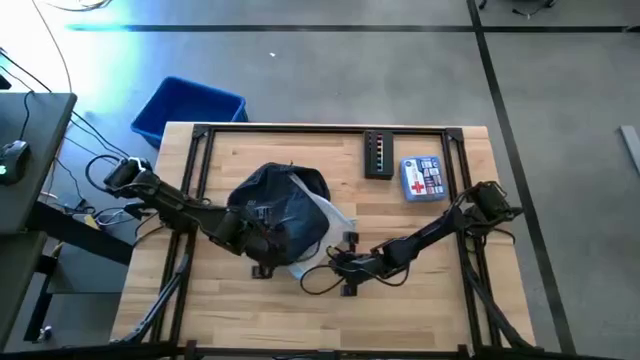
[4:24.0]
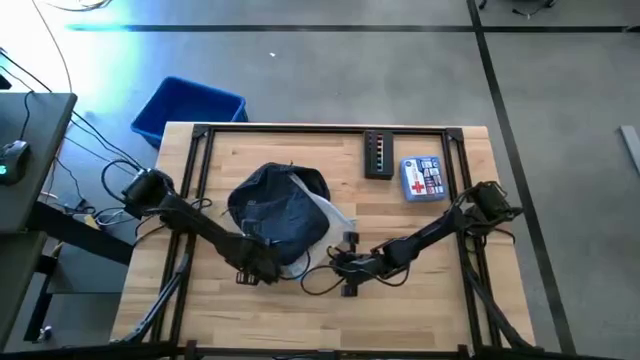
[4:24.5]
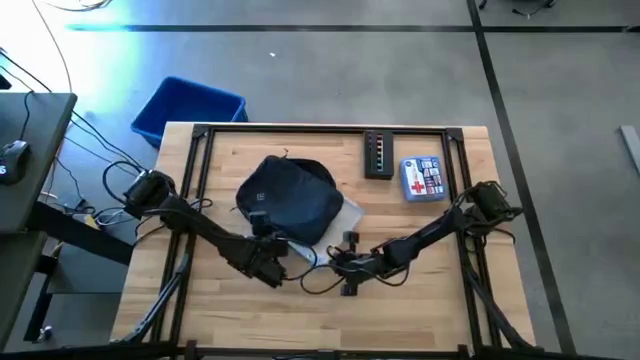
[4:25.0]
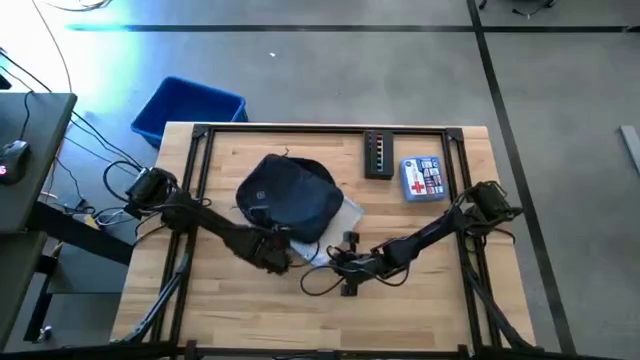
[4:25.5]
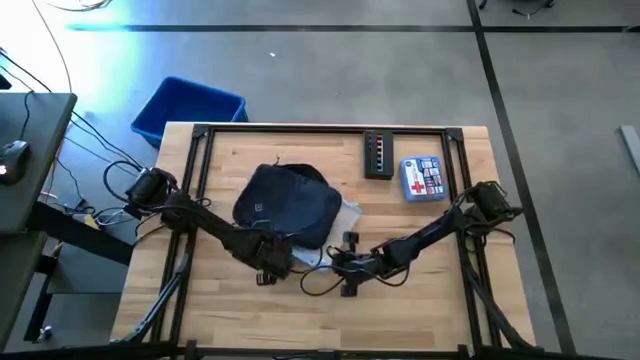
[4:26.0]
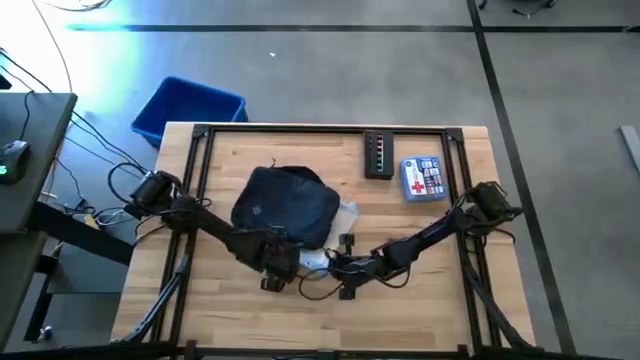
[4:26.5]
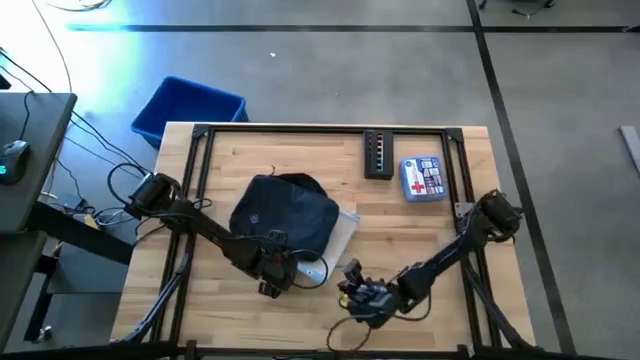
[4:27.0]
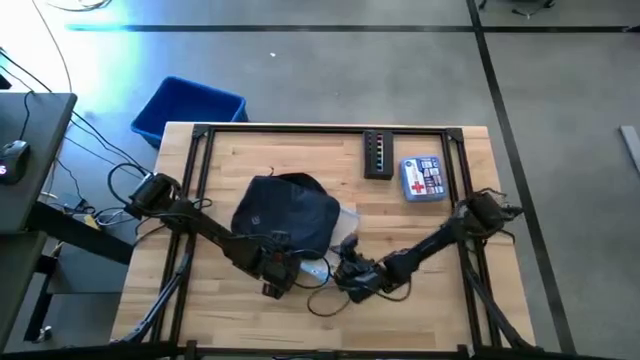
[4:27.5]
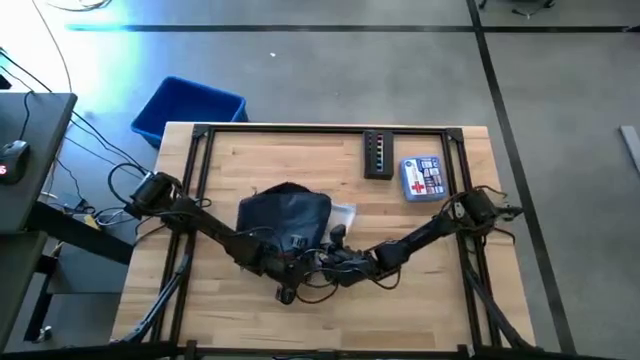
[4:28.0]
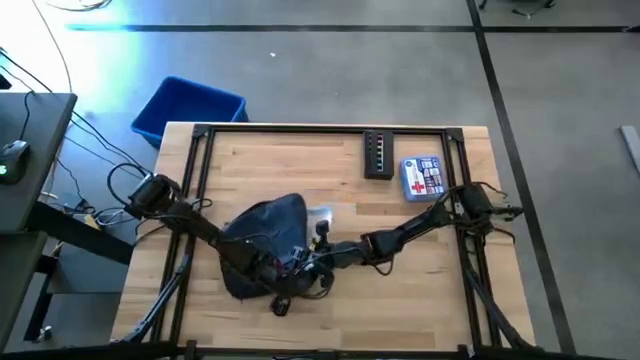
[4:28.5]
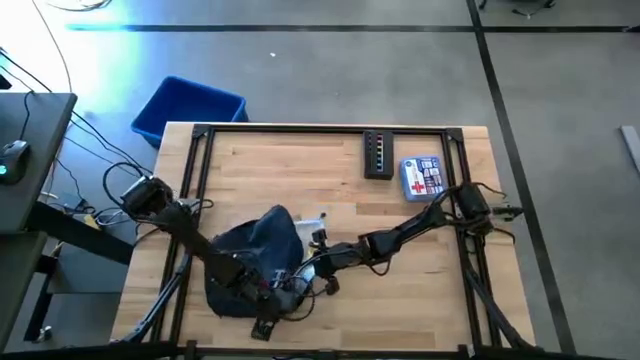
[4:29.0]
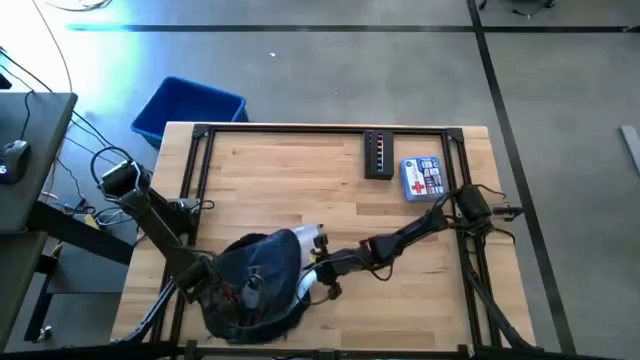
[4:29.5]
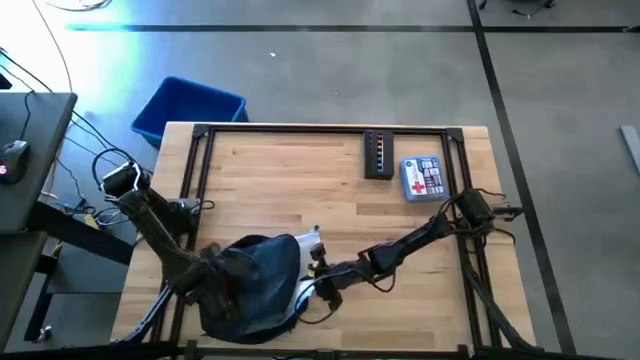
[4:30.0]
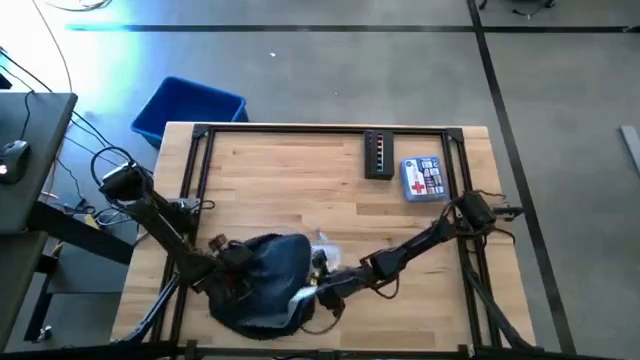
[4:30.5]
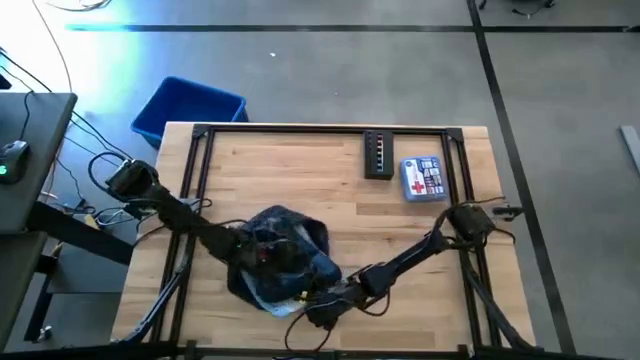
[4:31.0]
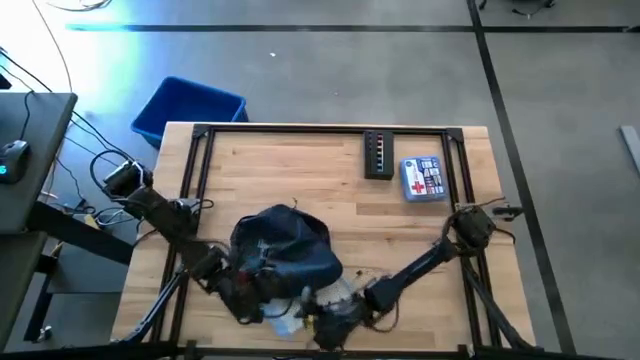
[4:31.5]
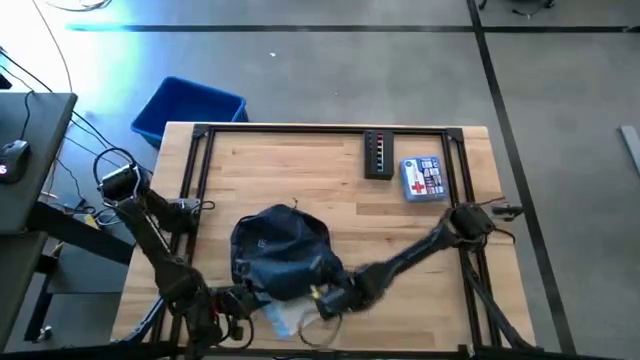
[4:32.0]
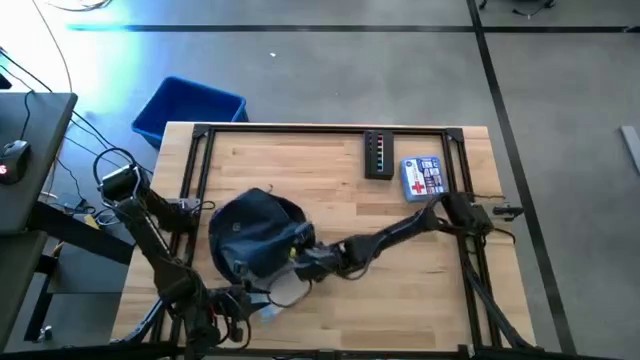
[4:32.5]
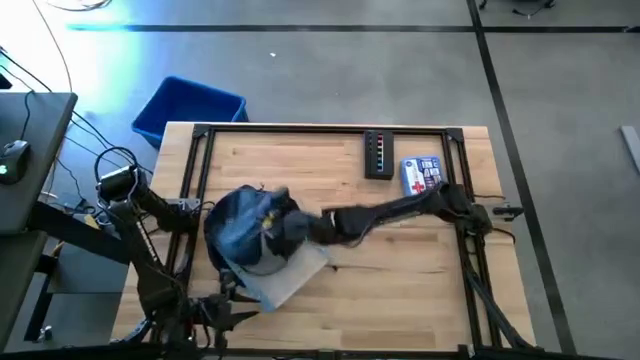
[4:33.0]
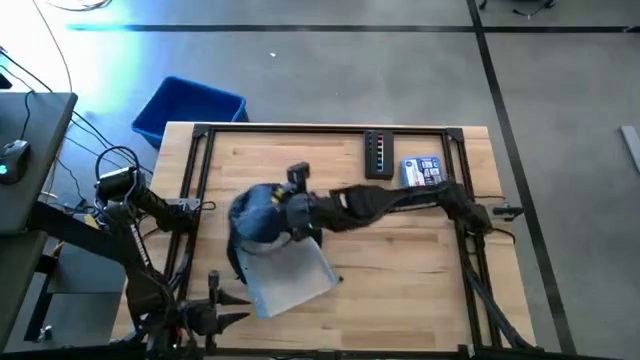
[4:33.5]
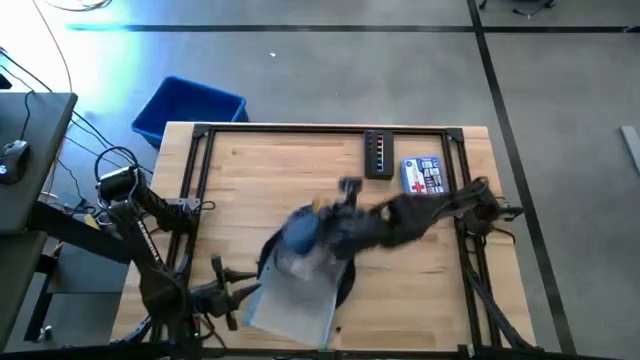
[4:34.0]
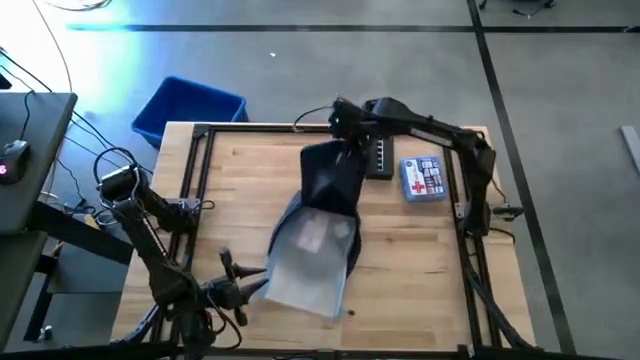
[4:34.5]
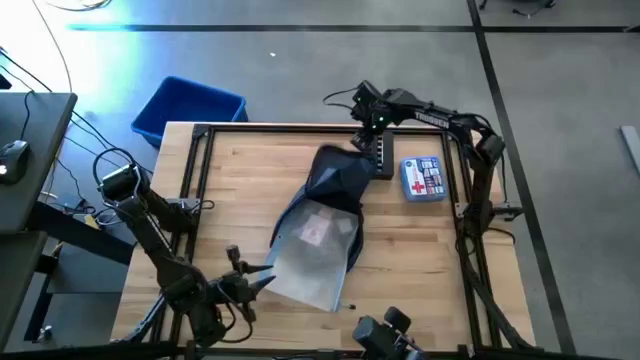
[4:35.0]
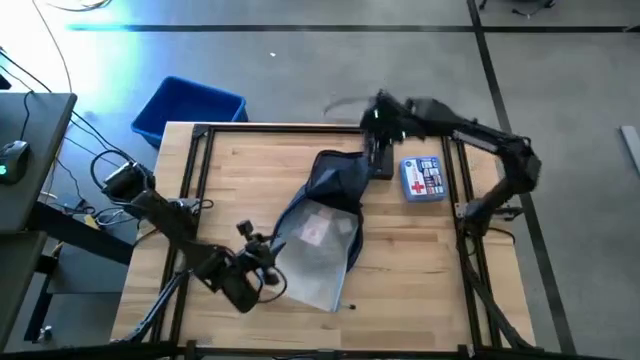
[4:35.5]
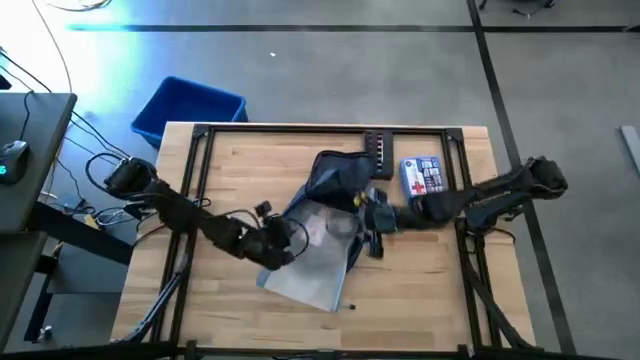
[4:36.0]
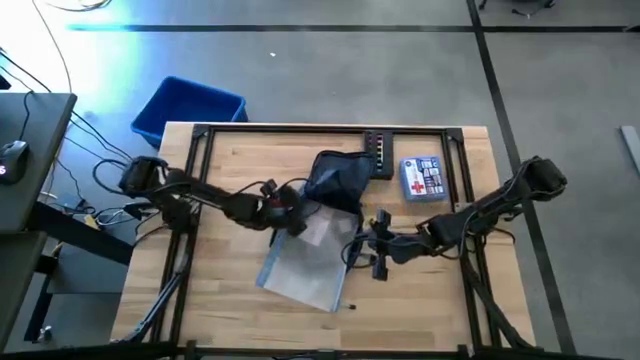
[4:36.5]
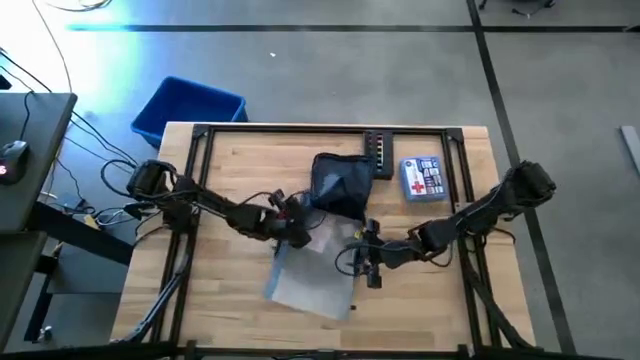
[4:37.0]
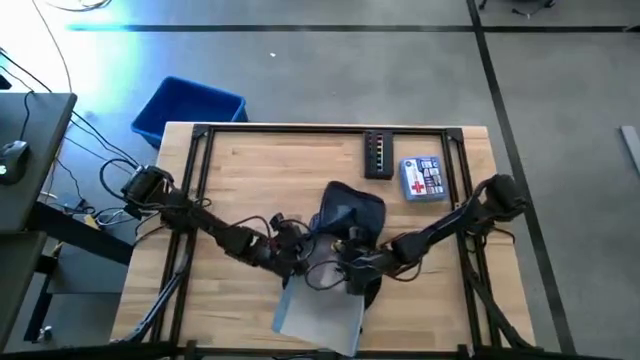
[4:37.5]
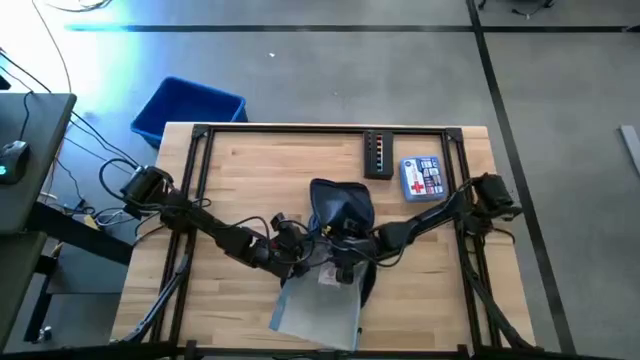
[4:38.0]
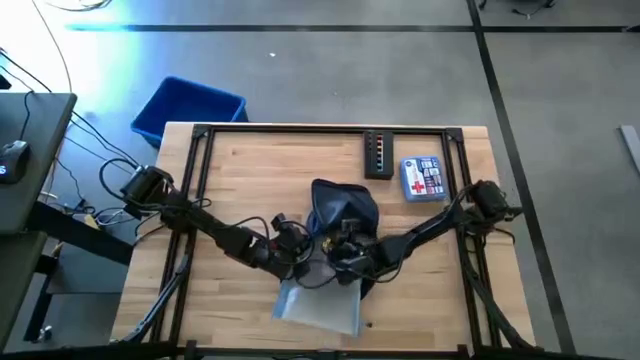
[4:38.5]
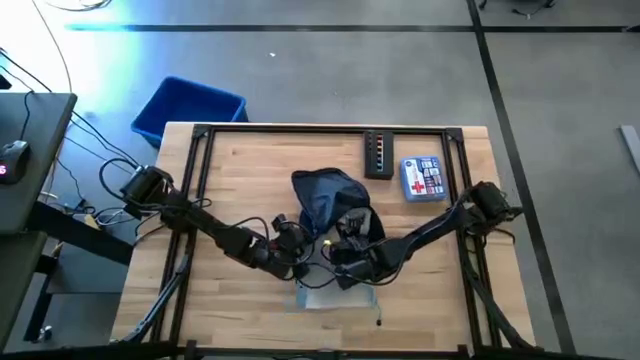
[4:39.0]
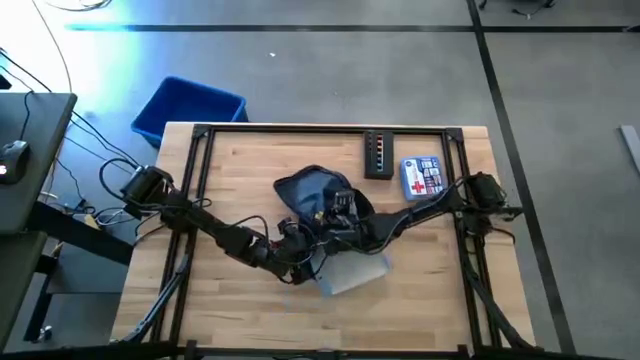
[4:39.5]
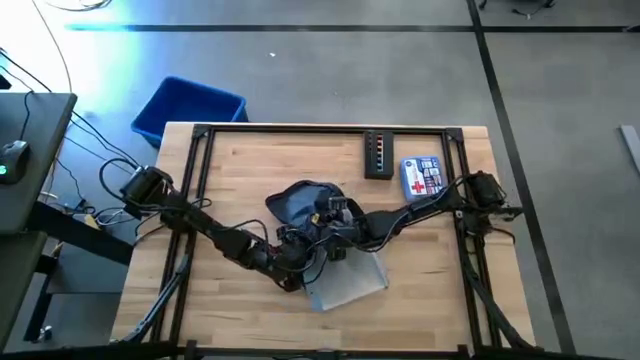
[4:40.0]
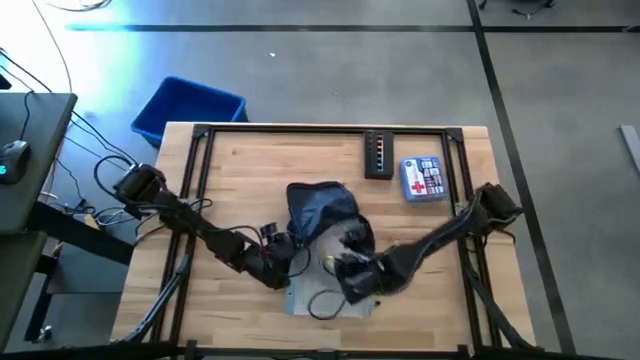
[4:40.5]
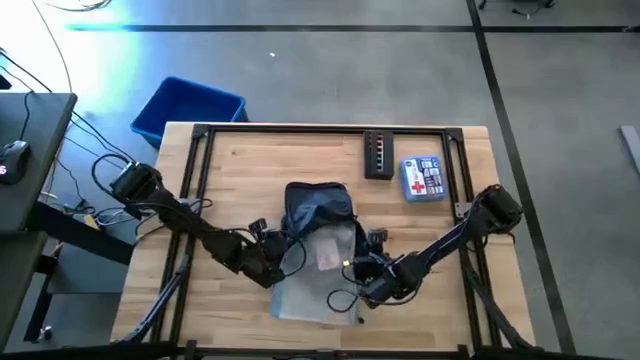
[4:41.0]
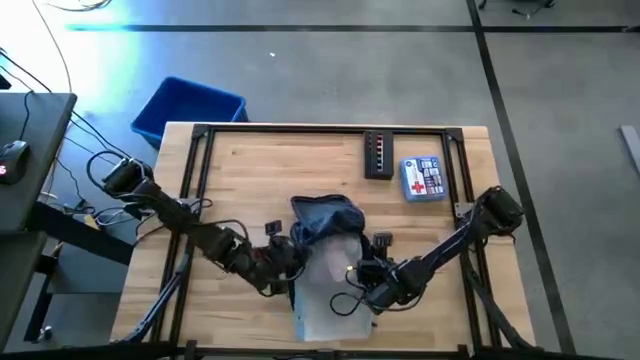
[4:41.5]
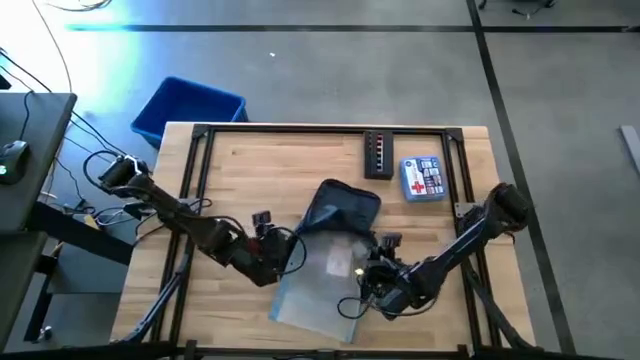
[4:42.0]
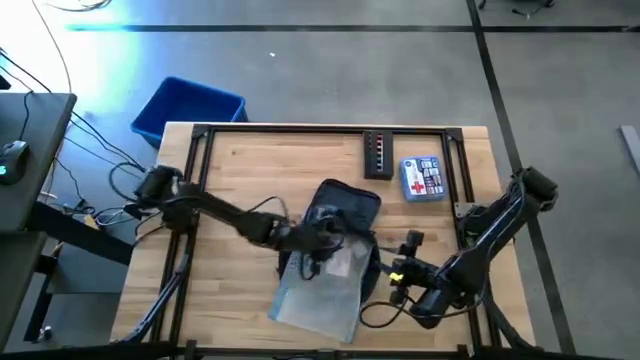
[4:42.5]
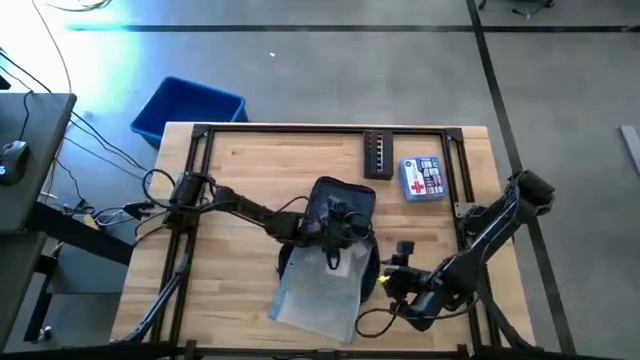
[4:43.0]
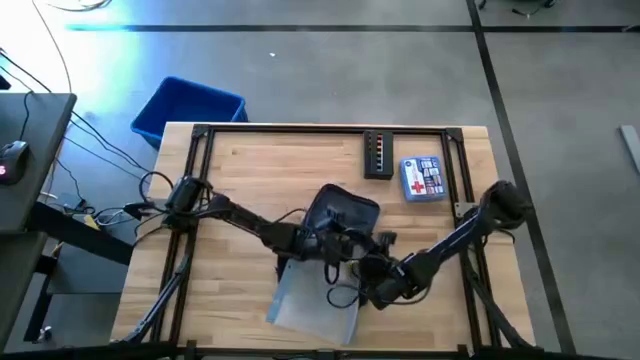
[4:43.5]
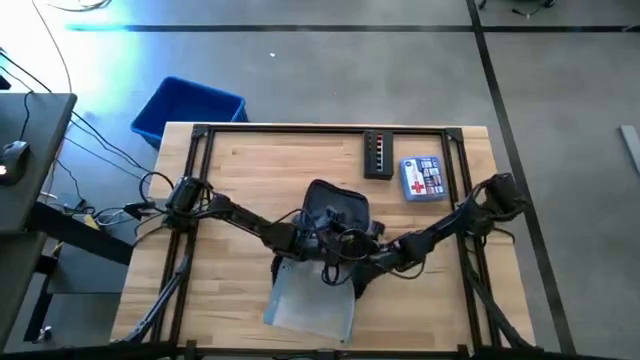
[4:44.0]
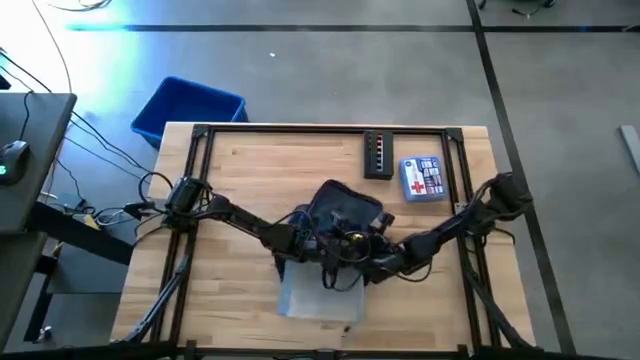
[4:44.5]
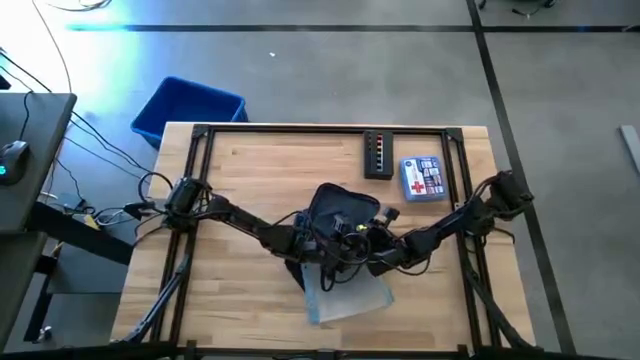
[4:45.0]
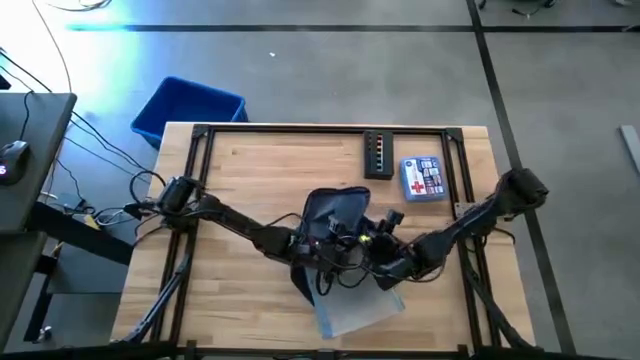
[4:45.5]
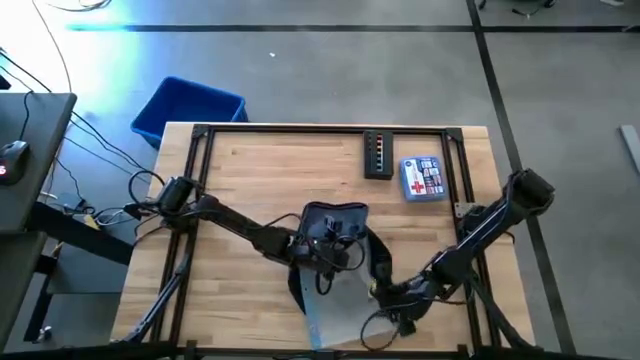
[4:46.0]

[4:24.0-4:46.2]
Task: Unpack backpack
Put the white zip bag into the backpack
